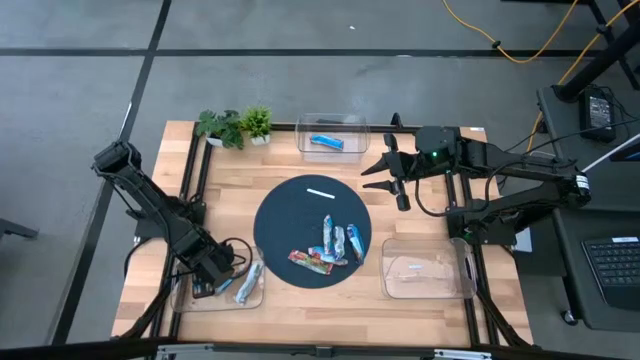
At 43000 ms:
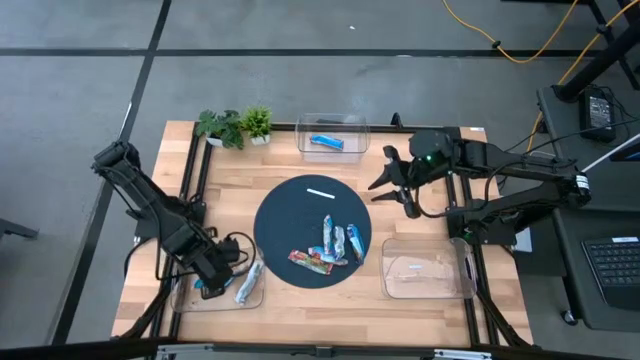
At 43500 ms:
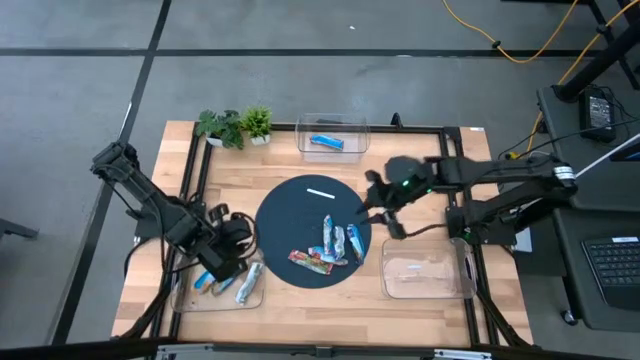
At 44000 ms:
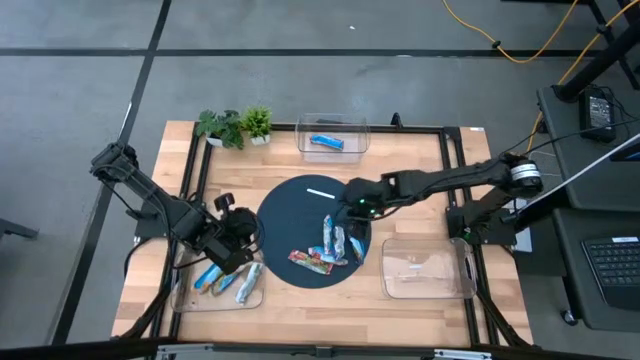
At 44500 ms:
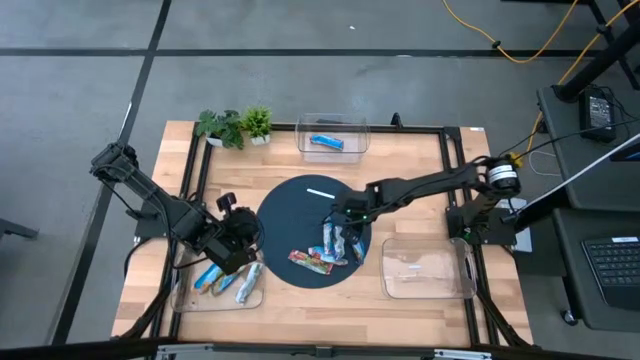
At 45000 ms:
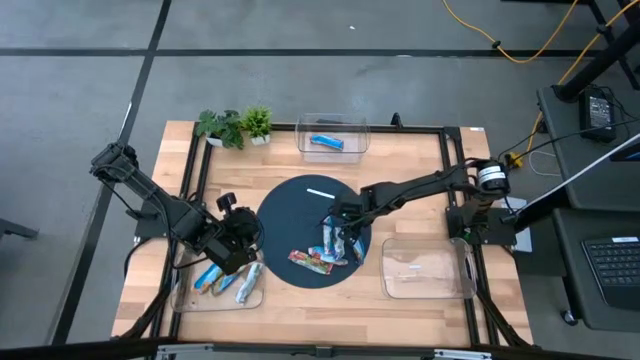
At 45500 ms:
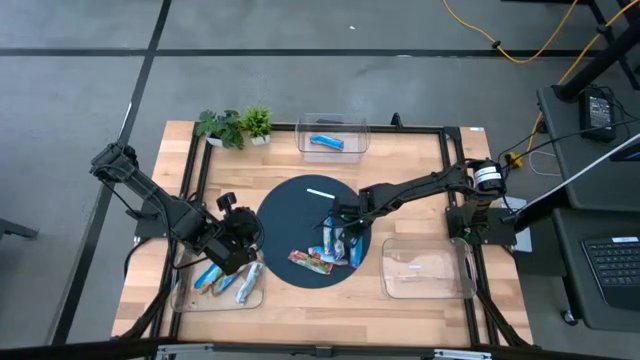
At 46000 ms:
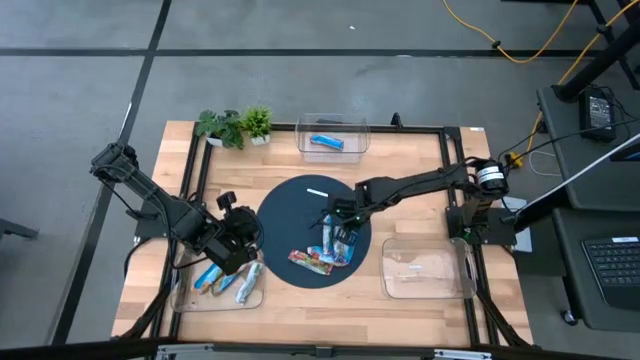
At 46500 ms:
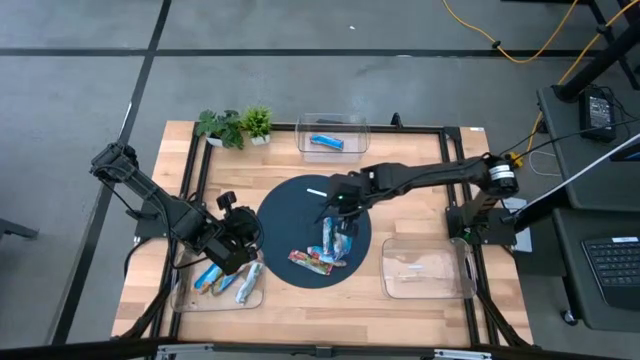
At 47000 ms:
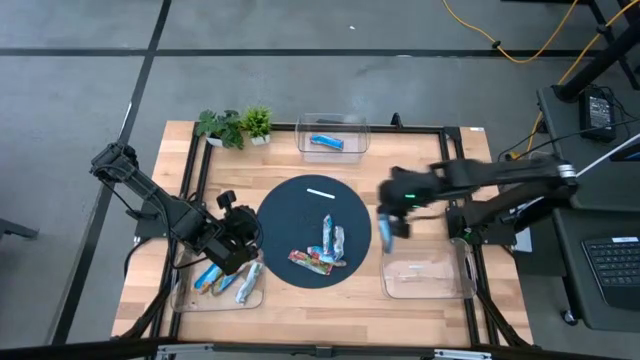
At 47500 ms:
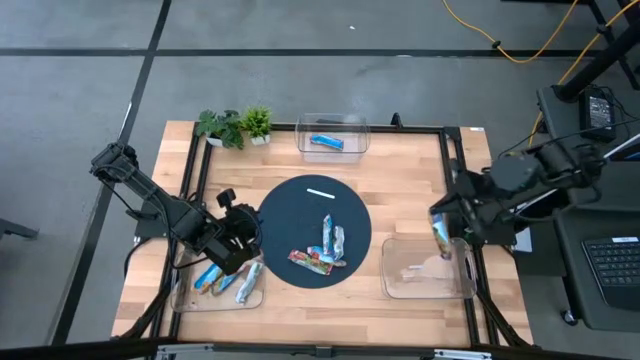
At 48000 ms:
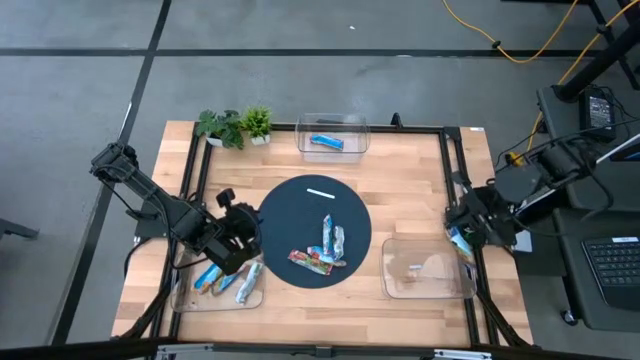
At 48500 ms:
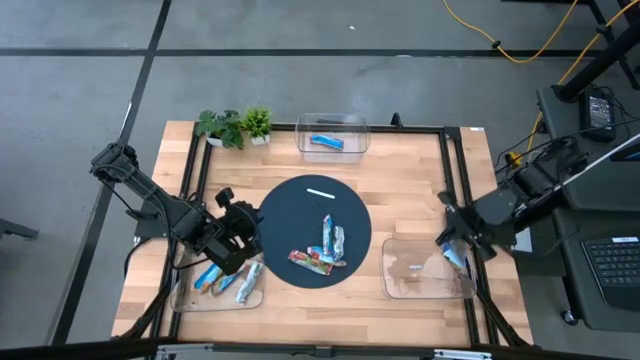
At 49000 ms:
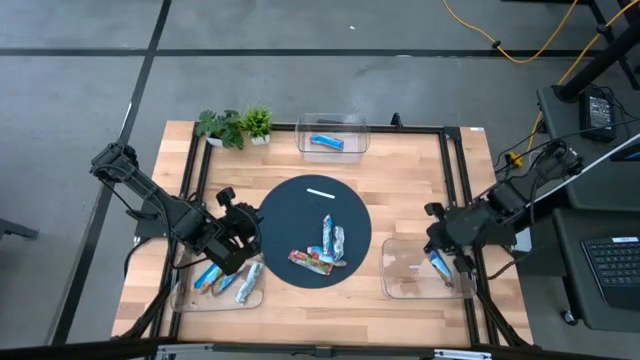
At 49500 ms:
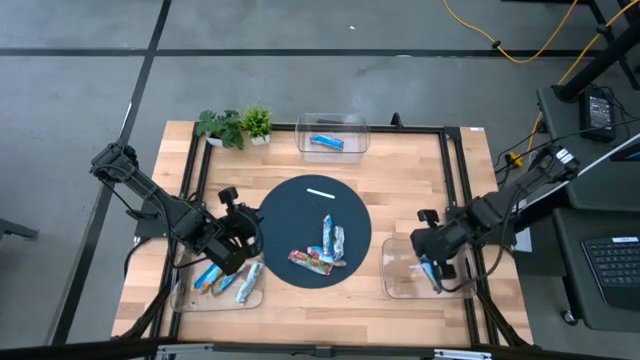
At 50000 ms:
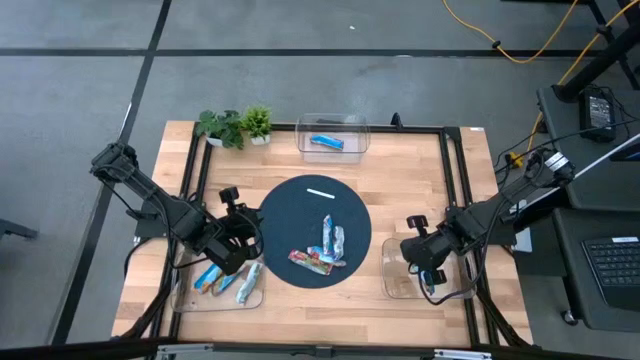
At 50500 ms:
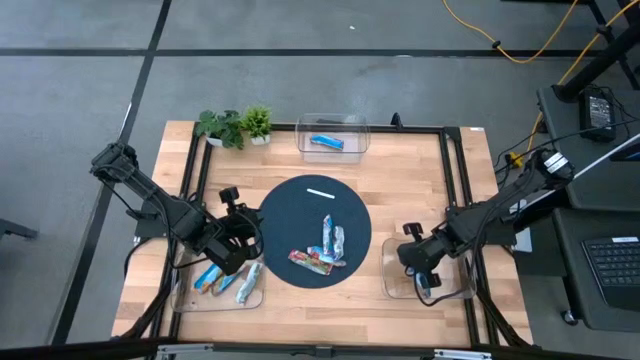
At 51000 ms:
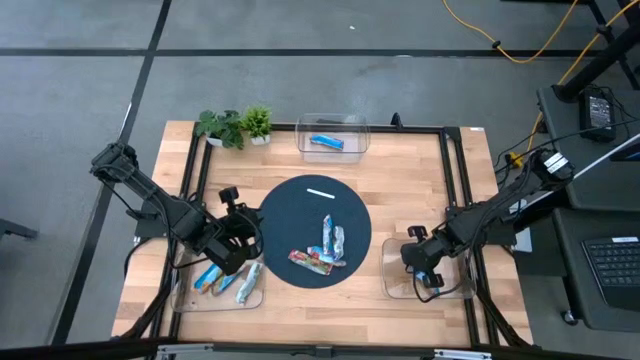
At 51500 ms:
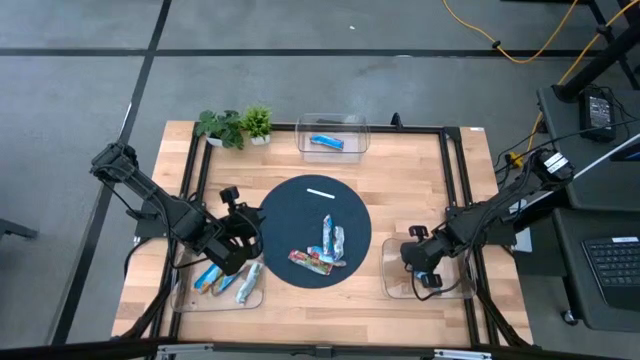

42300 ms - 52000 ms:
Task: Pick and place Granola Bars by type
Put the blue granola bar into the bottom right transparent bin

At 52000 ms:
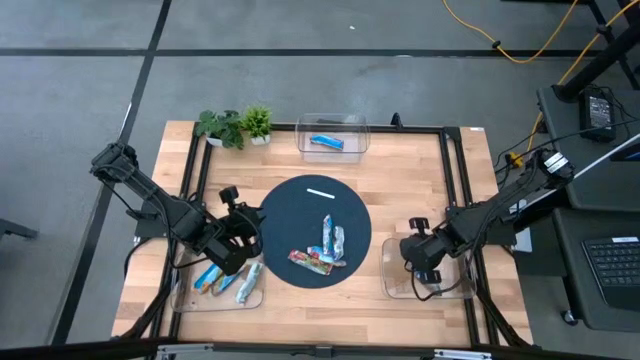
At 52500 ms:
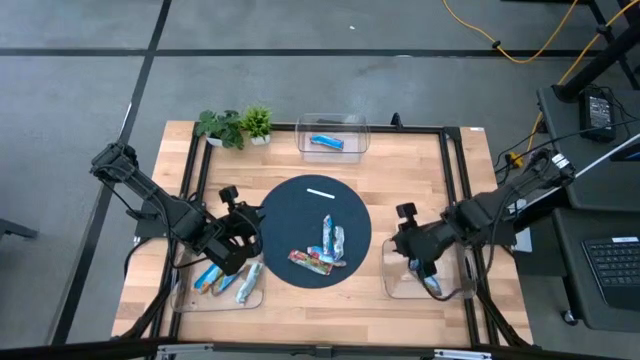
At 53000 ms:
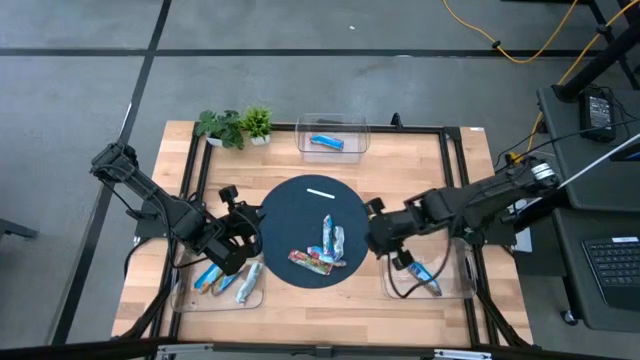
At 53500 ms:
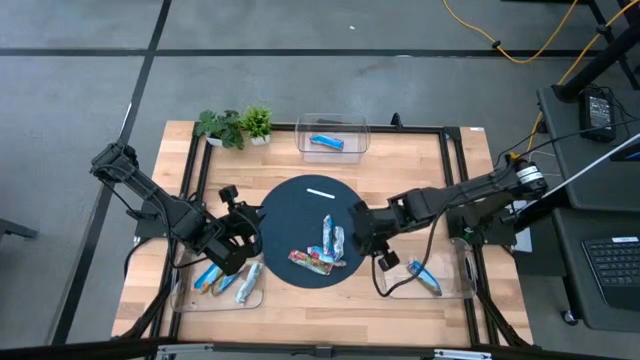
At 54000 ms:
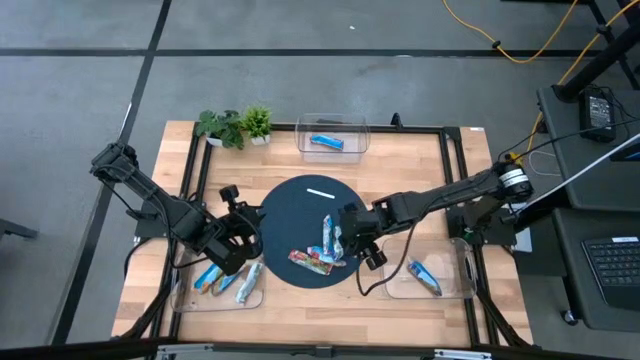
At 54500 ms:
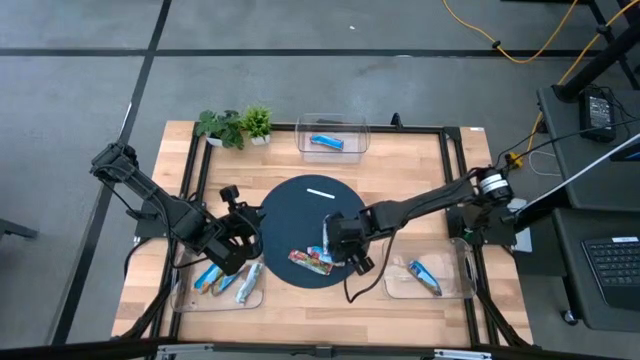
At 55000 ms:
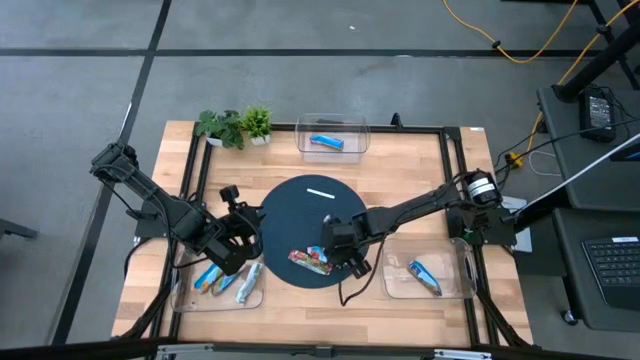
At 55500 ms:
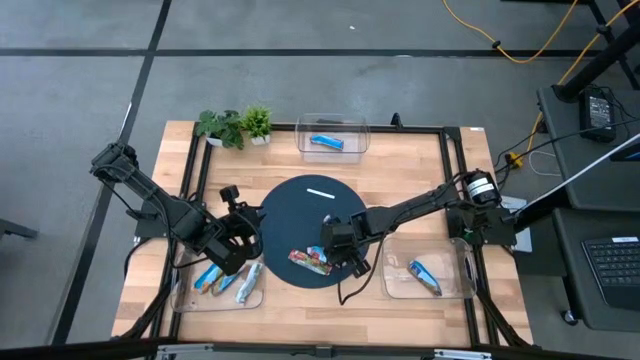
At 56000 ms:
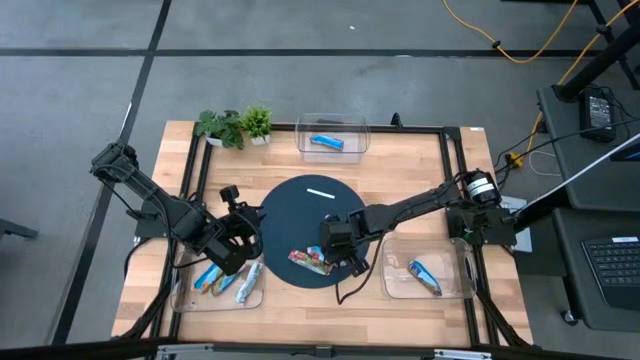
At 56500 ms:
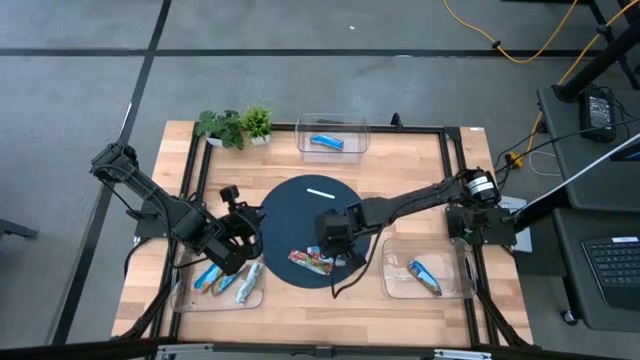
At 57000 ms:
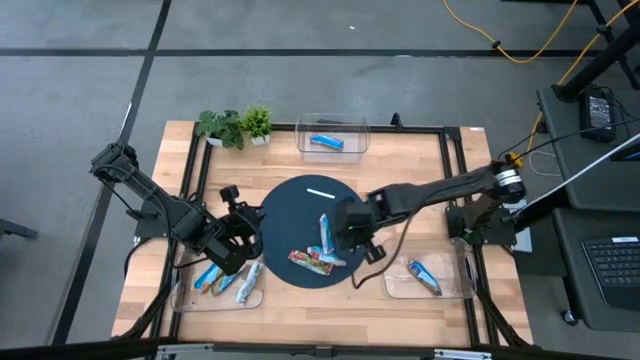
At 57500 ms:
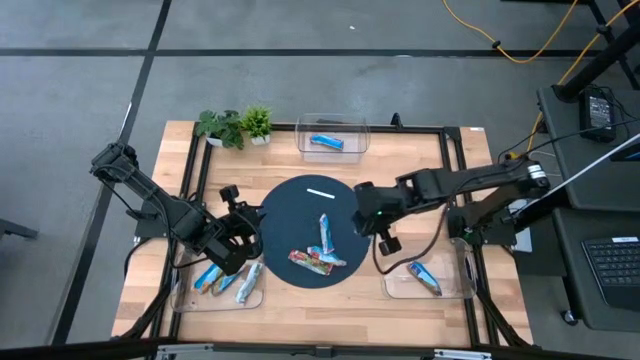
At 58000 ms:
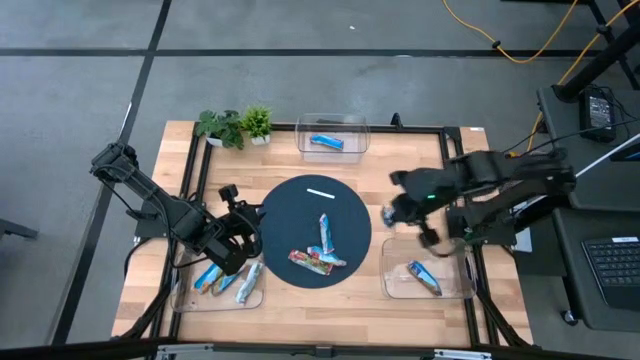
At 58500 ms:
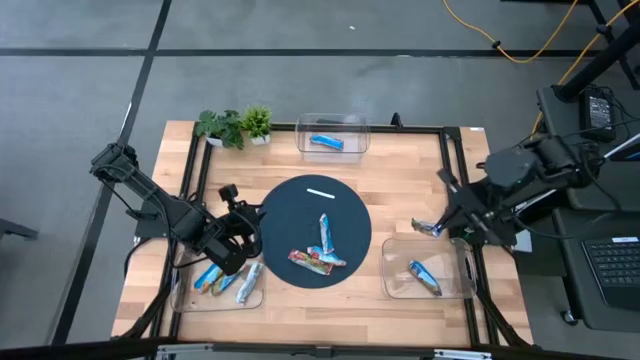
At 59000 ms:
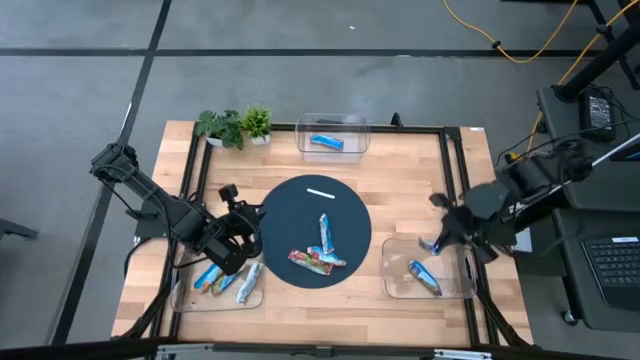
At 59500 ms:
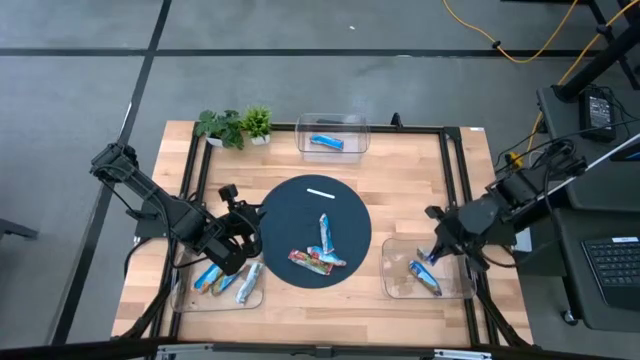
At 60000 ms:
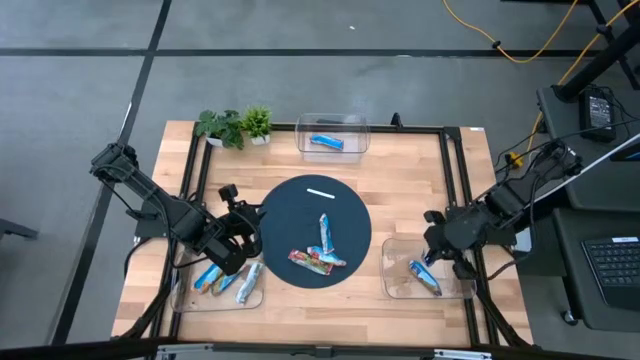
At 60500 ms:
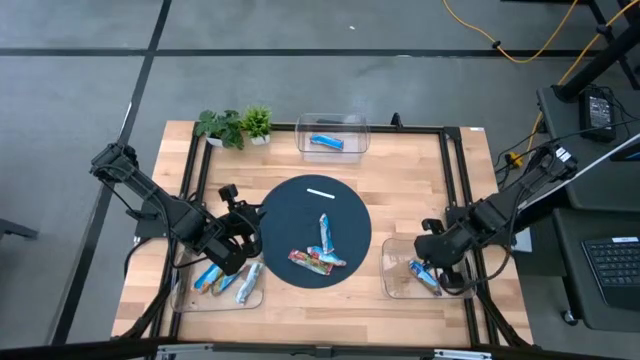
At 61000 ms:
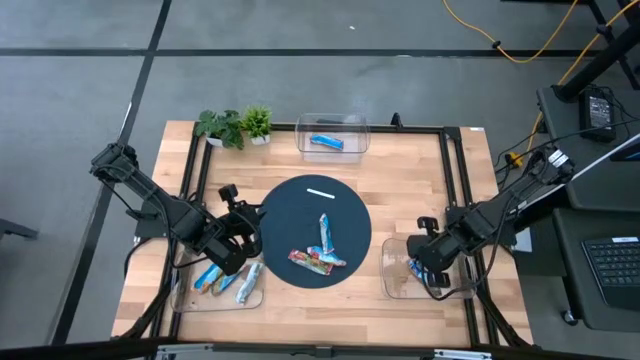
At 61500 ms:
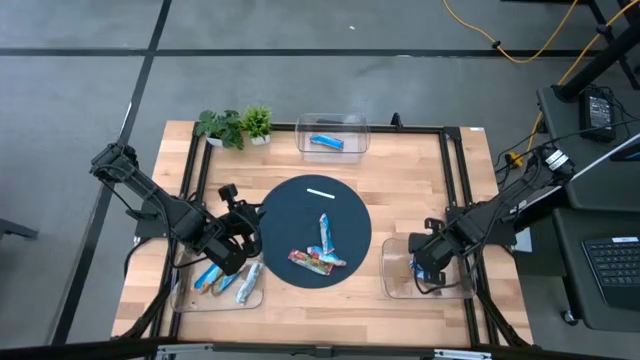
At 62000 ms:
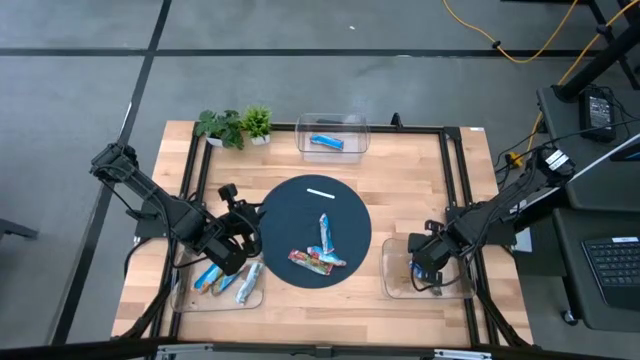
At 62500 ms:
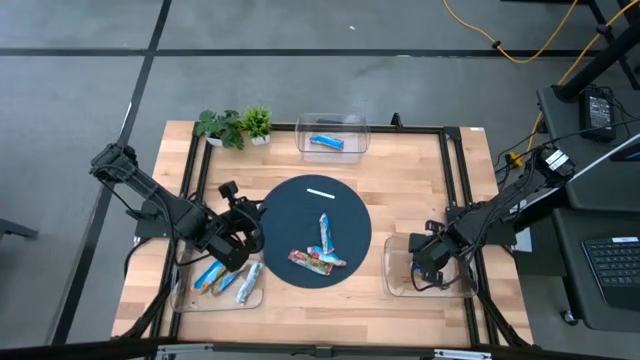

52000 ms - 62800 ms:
Put the blue granola bar into the bottom right transparent bin
